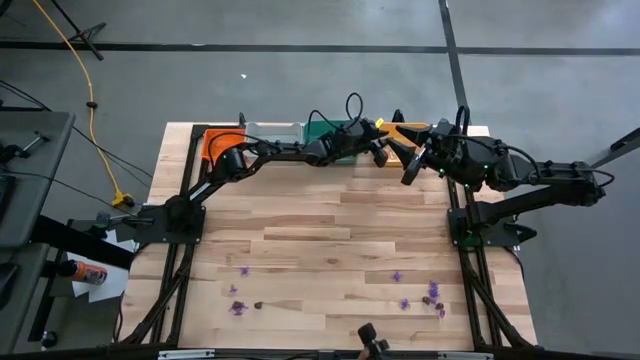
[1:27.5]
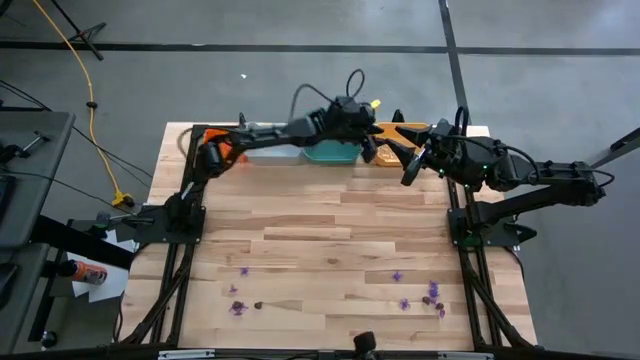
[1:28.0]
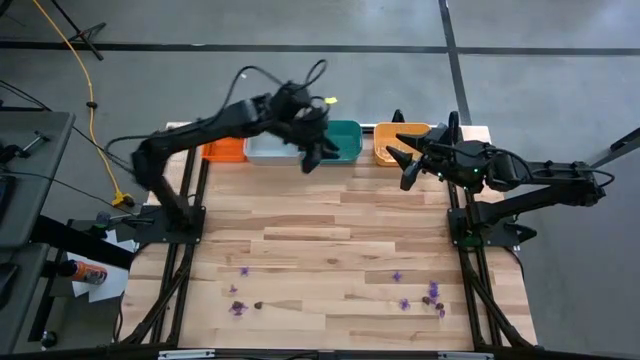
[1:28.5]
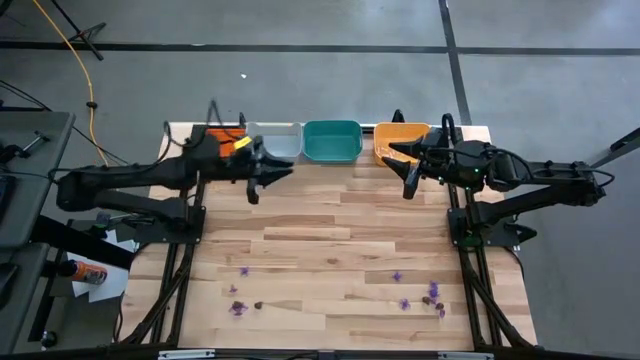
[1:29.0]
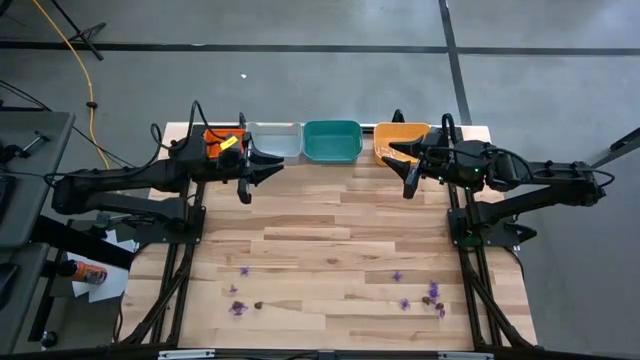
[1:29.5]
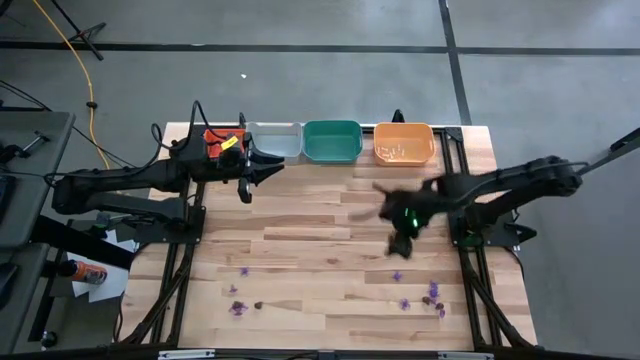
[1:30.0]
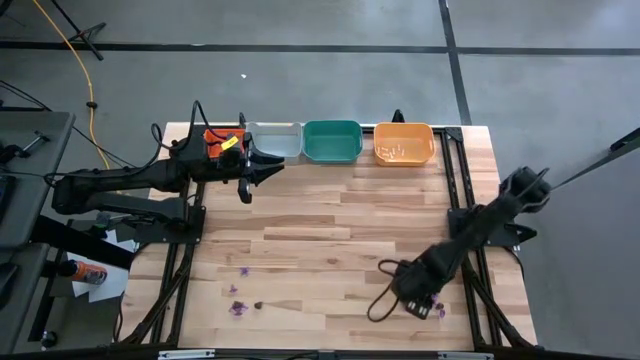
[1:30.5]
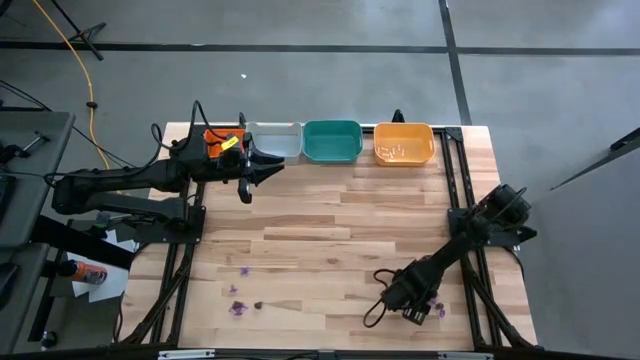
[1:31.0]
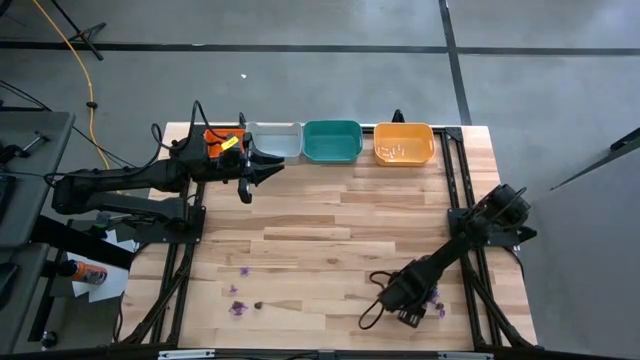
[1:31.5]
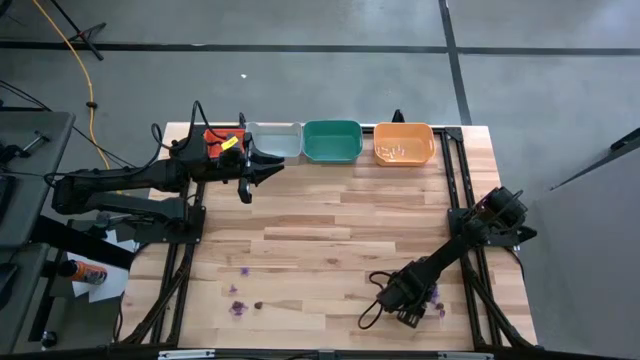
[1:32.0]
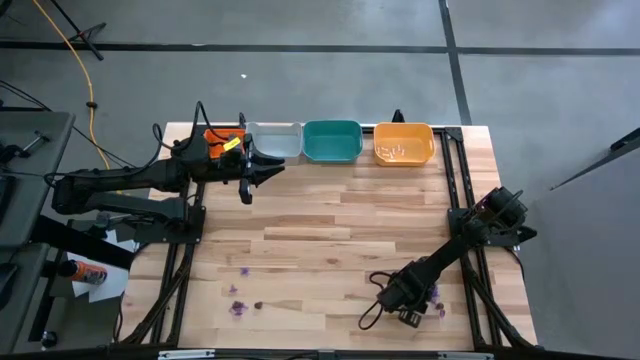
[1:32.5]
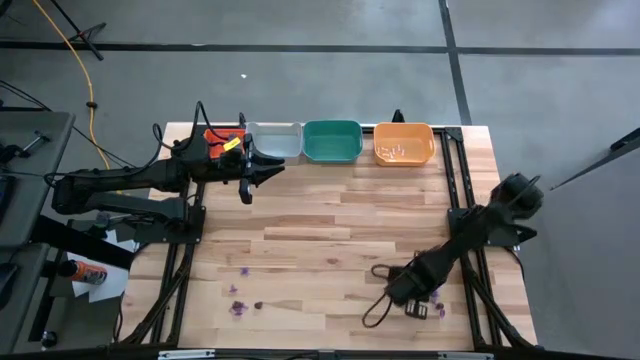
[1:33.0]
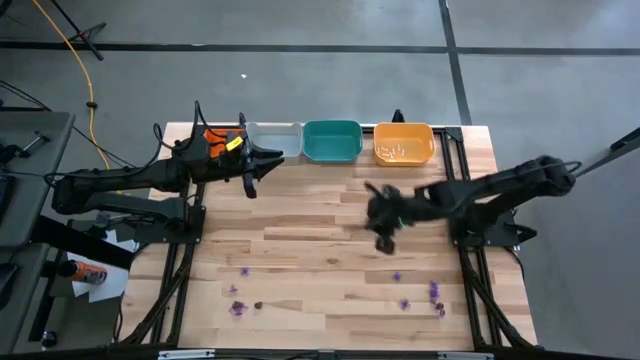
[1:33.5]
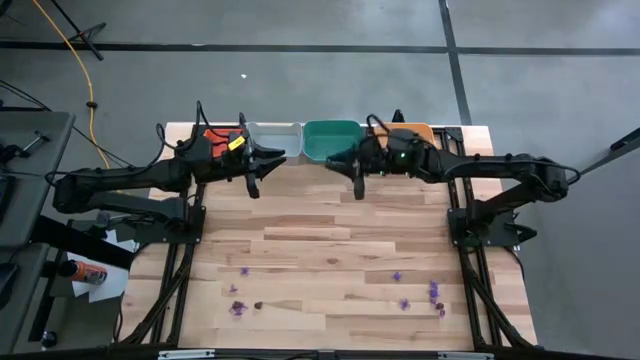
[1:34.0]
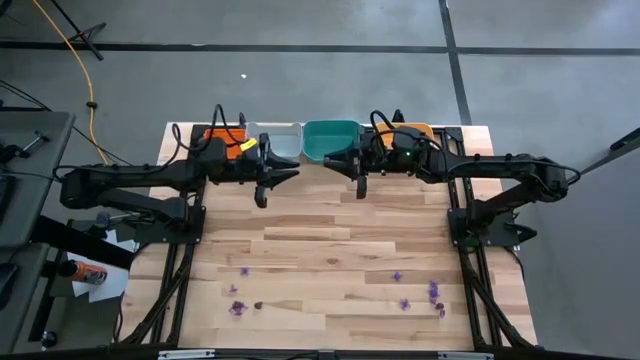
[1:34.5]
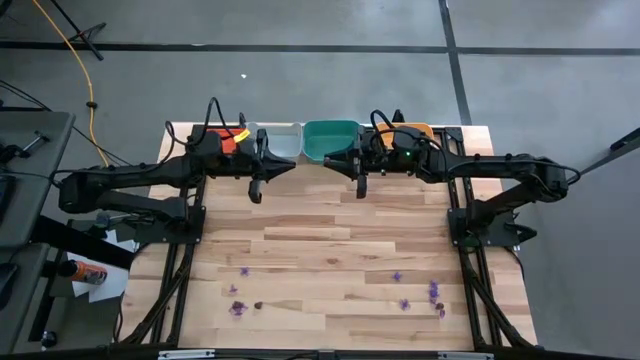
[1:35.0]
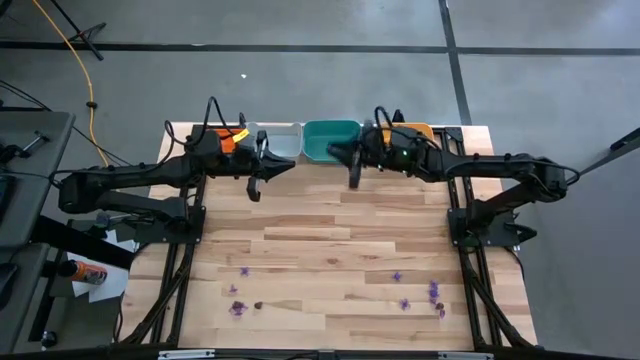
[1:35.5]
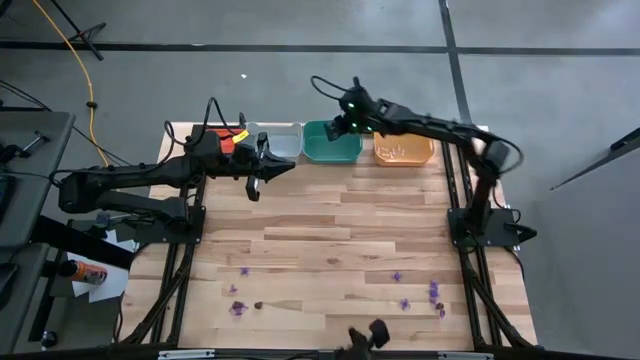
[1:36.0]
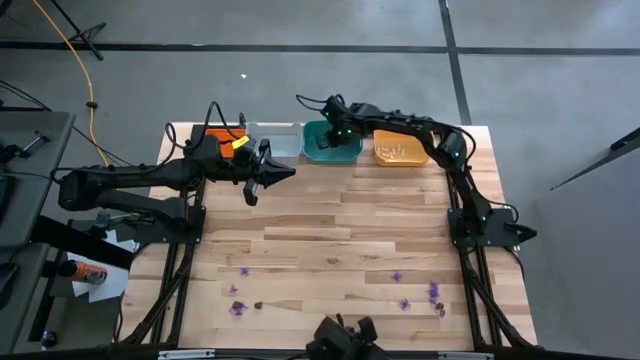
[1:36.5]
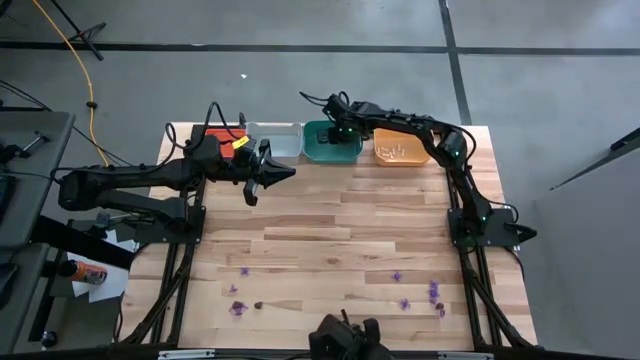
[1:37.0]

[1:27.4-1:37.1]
Task: Sort Halloween decoration
Put the black skull into the green bin

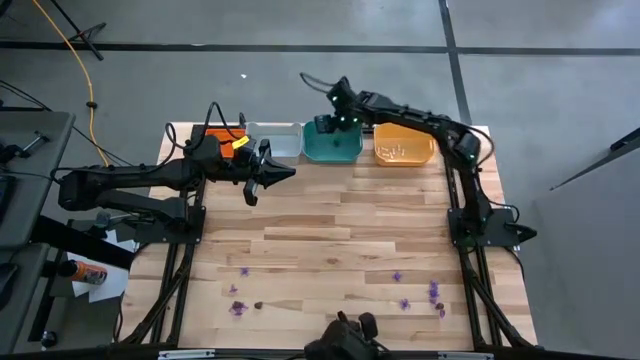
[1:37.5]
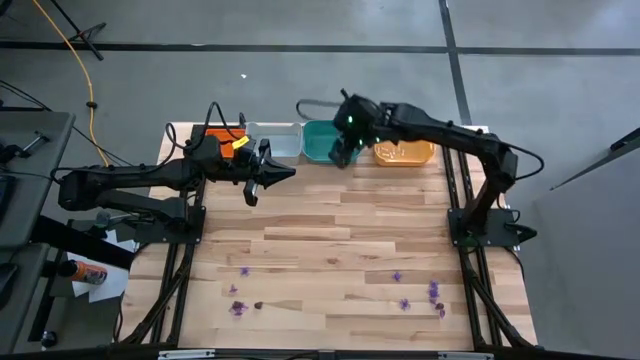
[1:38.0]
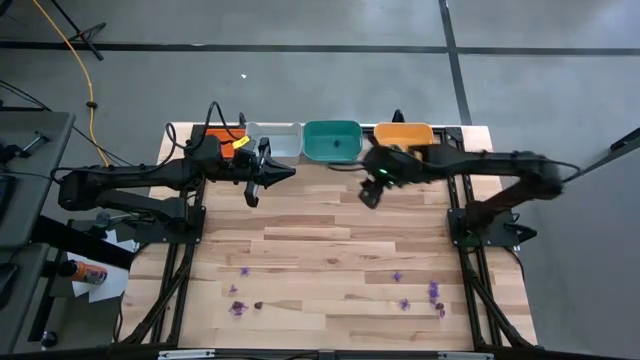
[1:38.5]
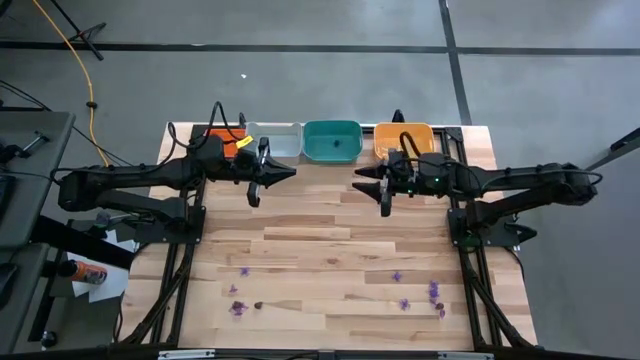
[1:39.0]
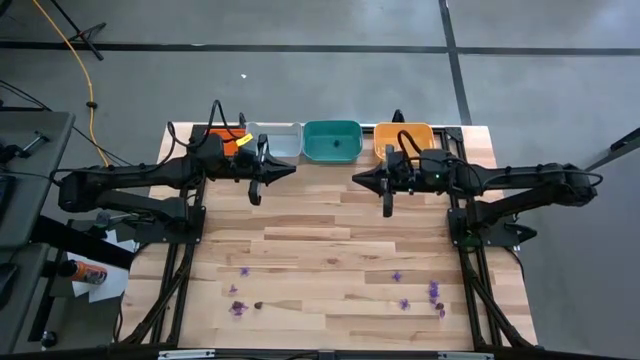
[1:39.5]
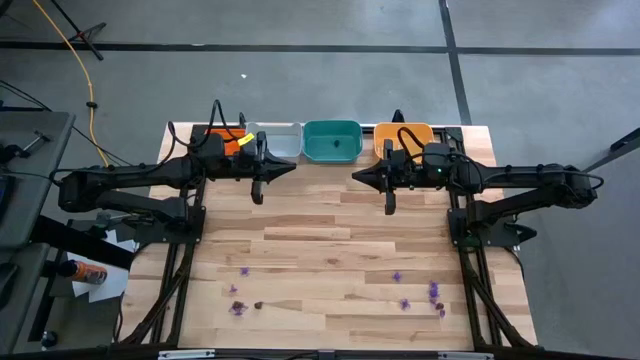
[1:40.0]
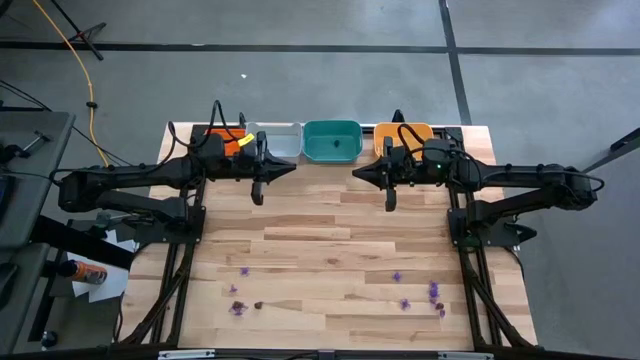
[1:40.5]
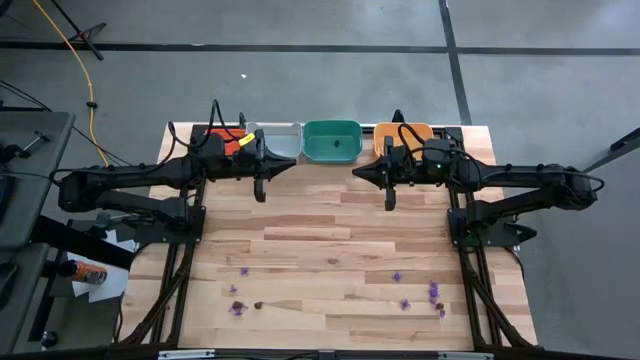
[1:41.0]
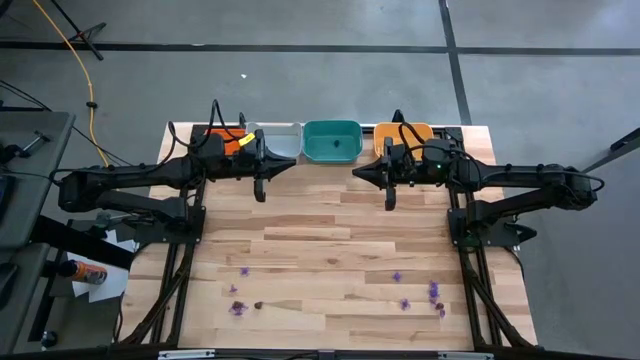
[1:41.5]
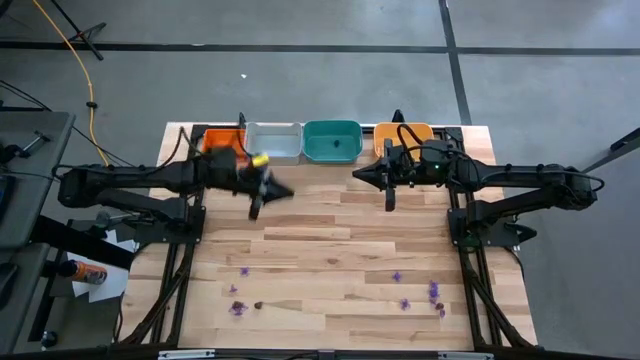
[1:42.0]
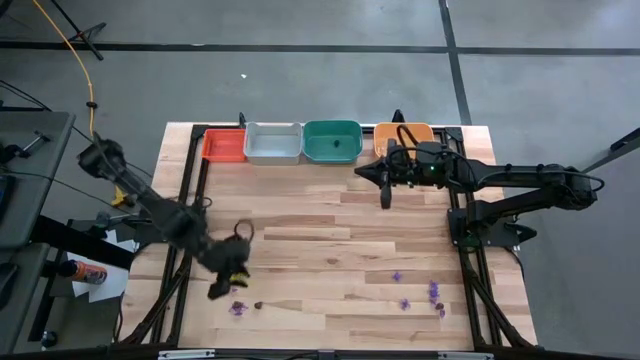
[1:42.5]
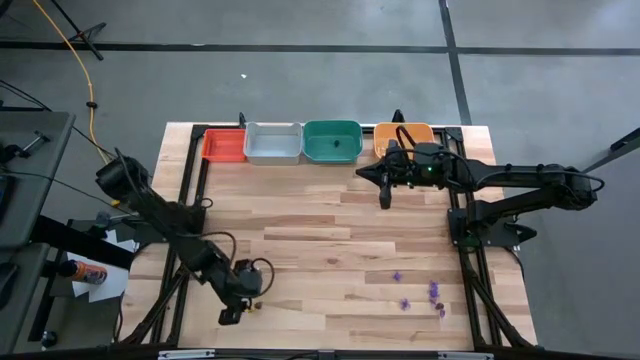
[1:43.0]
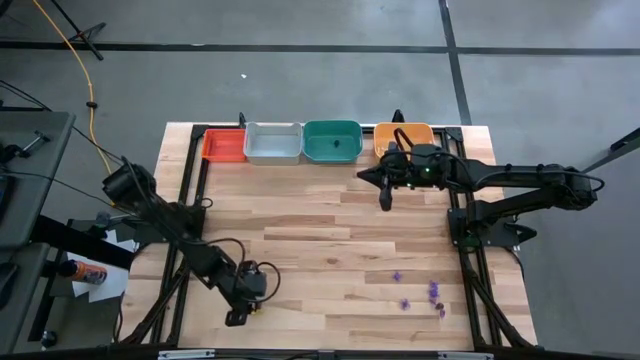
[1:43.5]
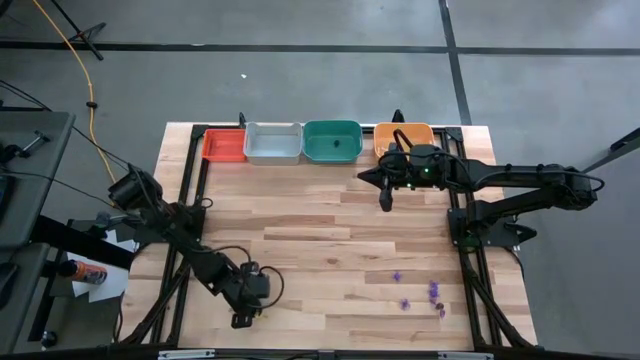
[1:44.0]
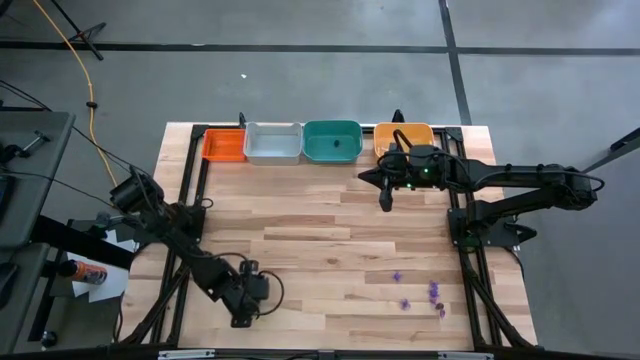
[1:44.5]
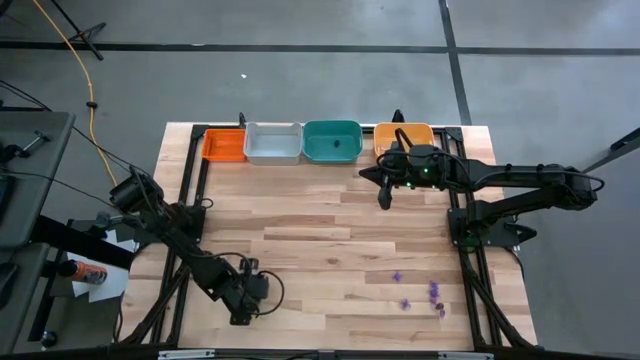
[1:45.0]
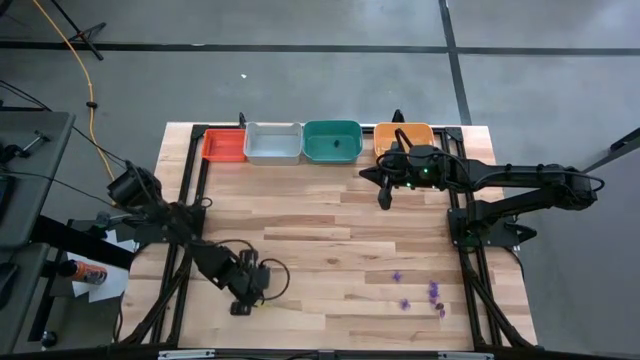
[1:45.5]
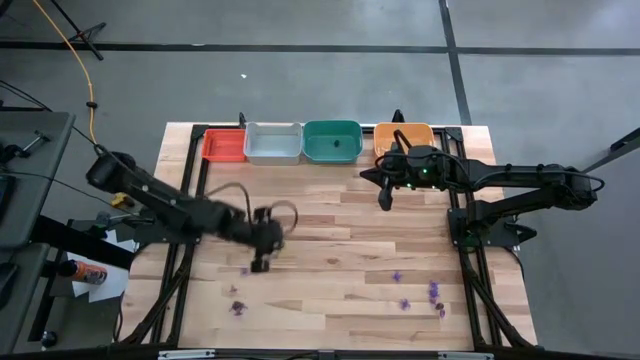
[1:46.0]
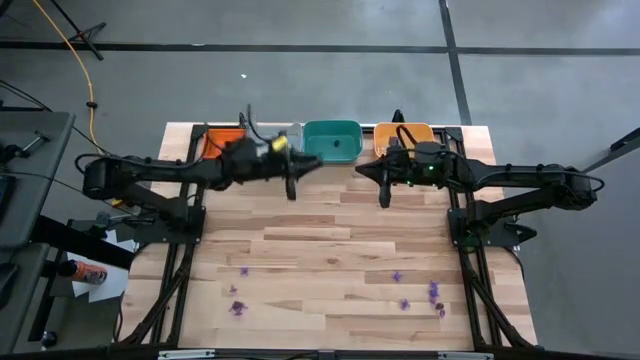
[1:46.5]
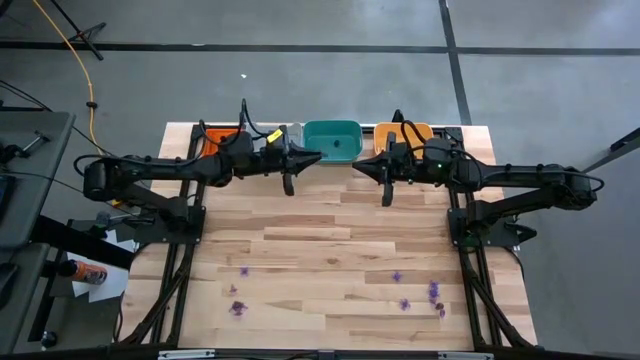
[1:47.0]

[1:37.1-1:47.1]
Put the black skull into the green bin
